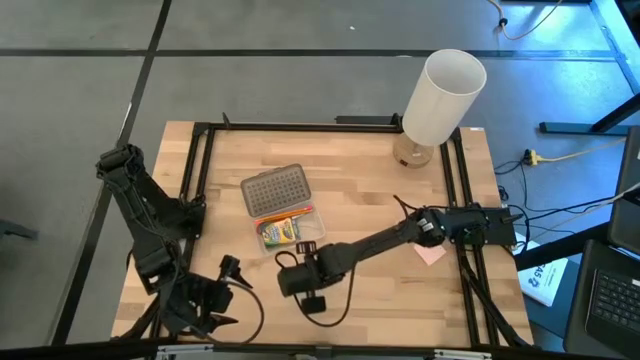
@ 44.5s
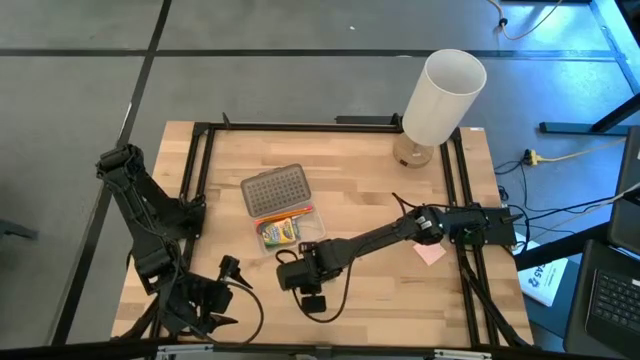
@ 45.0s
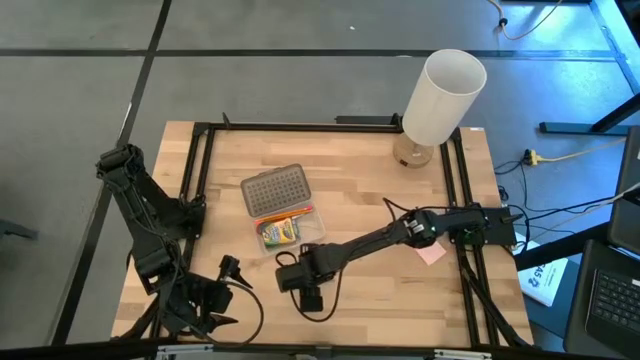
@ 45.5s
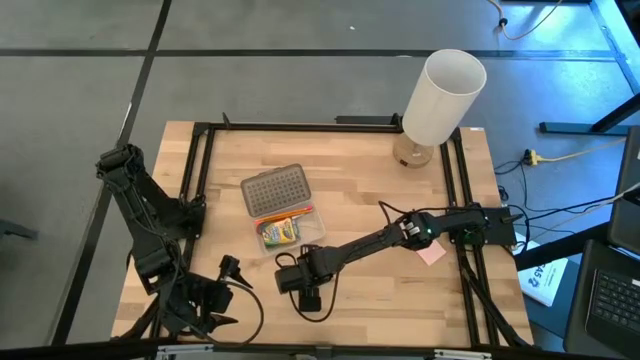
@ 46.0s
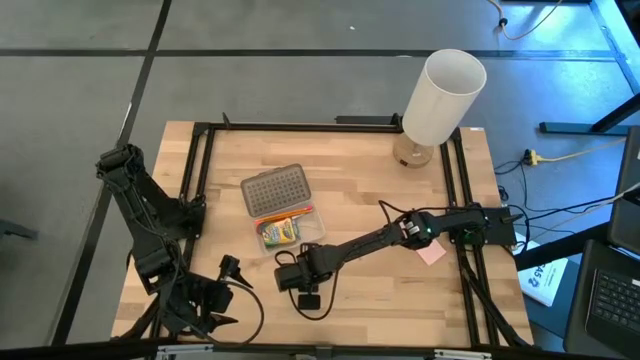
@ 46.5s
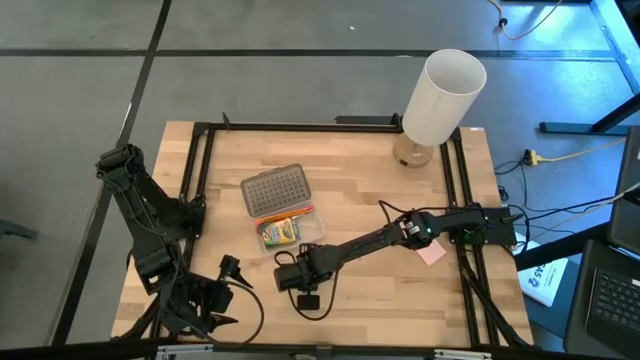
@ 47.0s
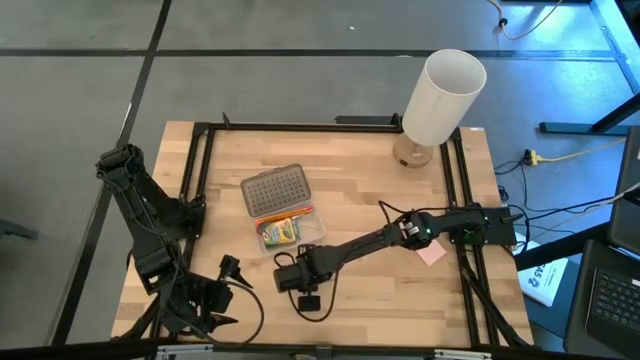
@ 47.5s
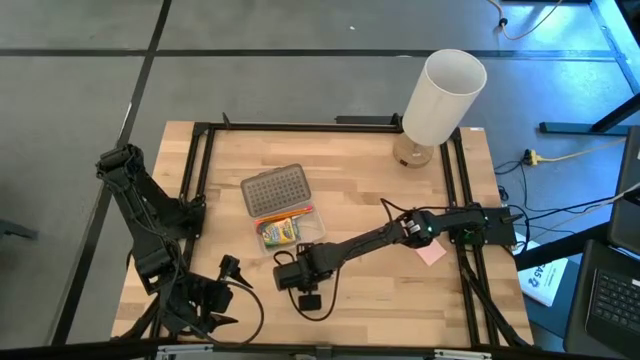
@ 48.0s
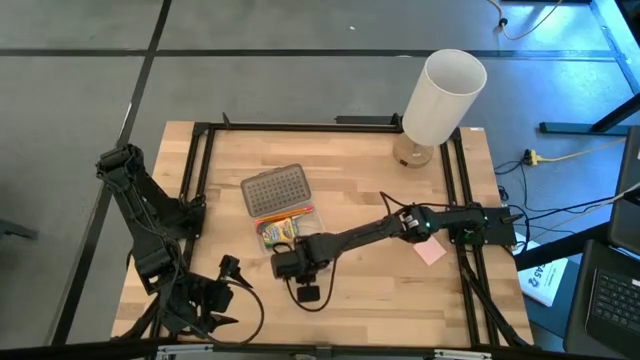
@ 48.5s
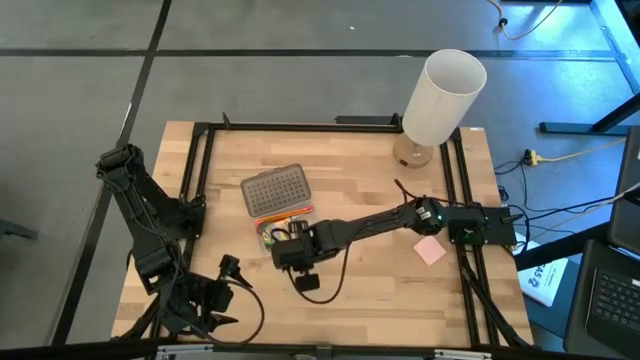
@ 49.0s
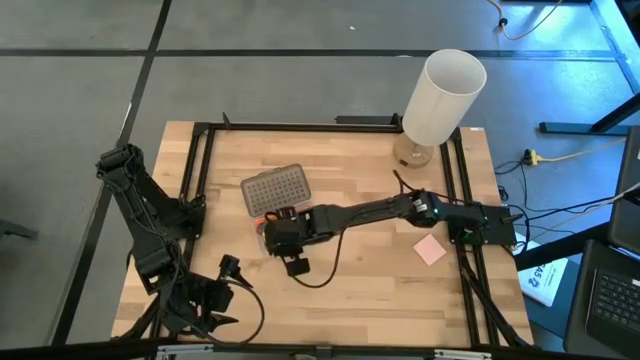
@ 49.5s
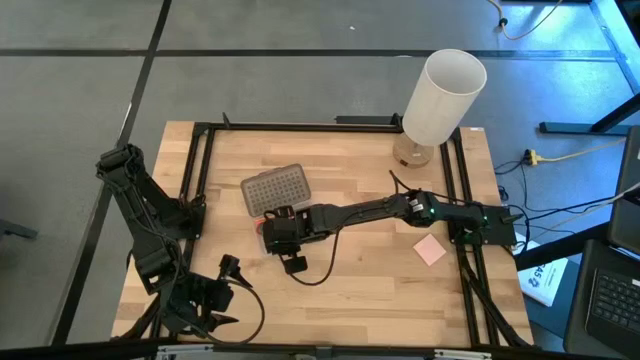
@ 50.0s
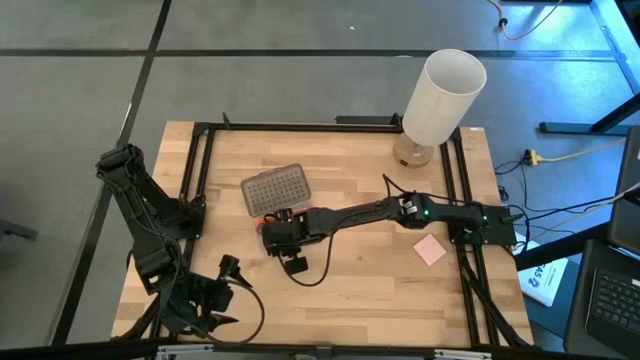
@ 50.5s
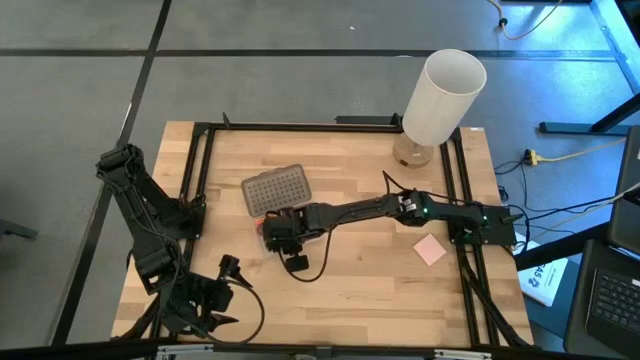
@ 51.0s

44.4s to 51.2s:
Task: Pack school essentials
Put the purple pen into the transparent supply box

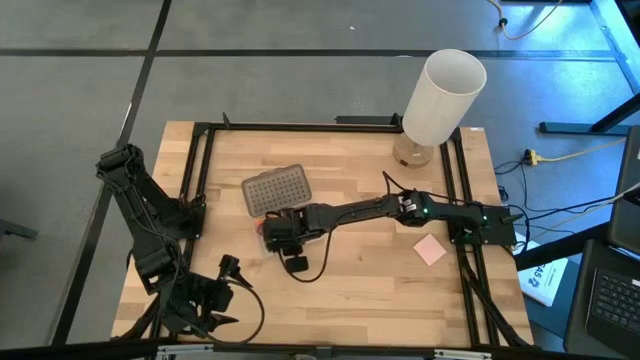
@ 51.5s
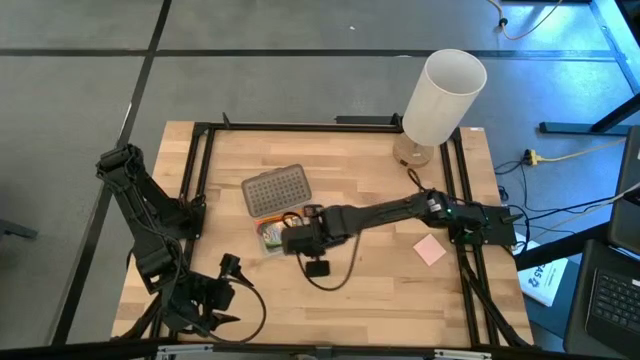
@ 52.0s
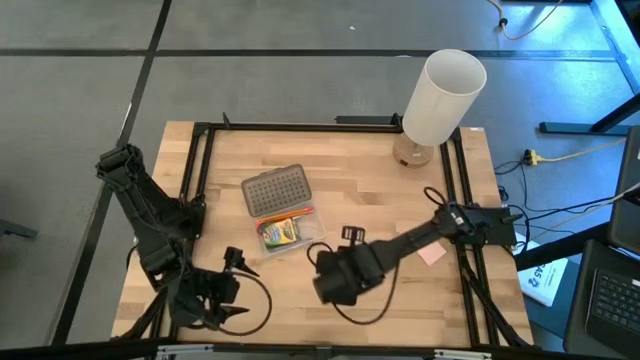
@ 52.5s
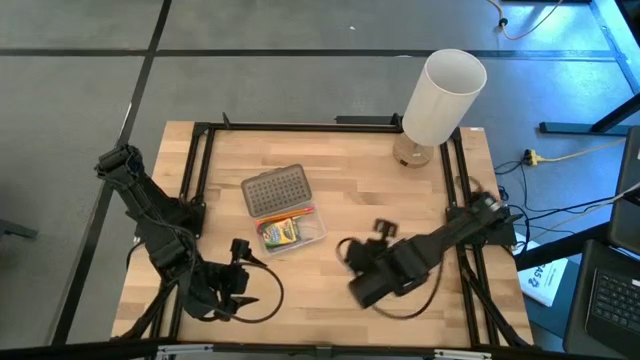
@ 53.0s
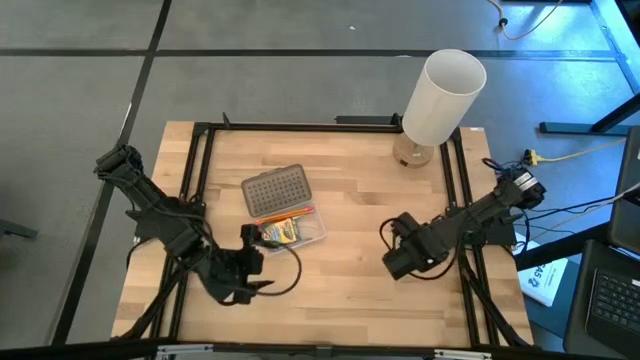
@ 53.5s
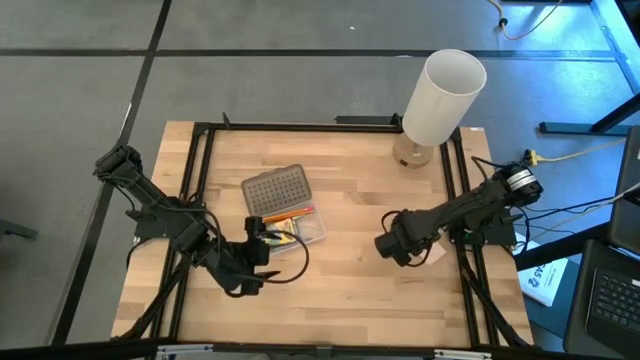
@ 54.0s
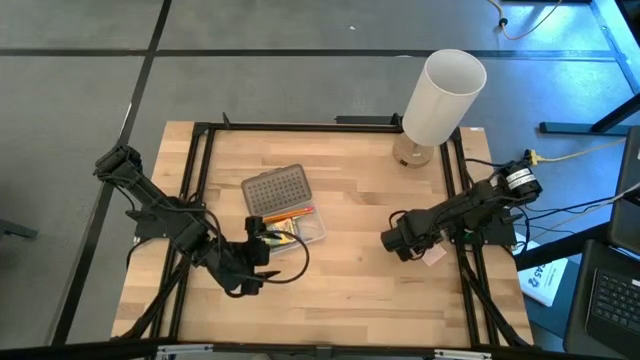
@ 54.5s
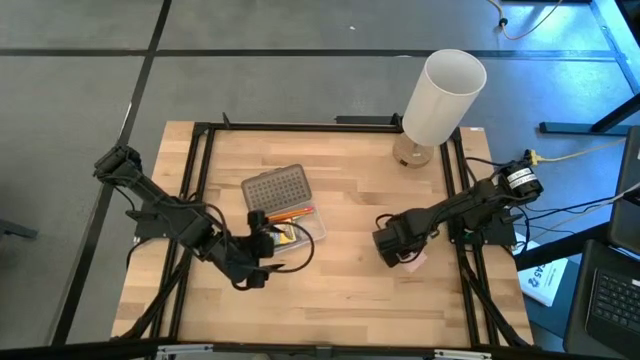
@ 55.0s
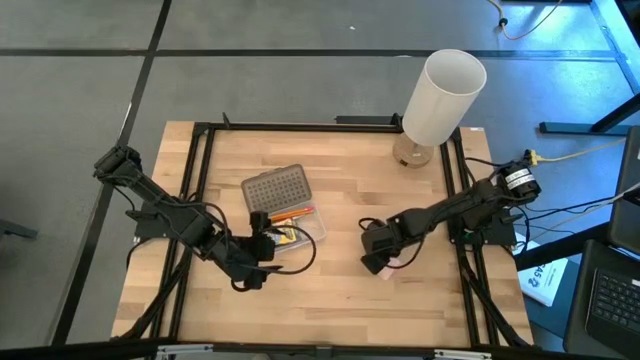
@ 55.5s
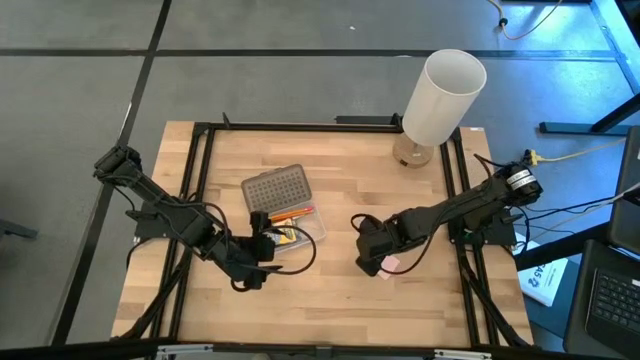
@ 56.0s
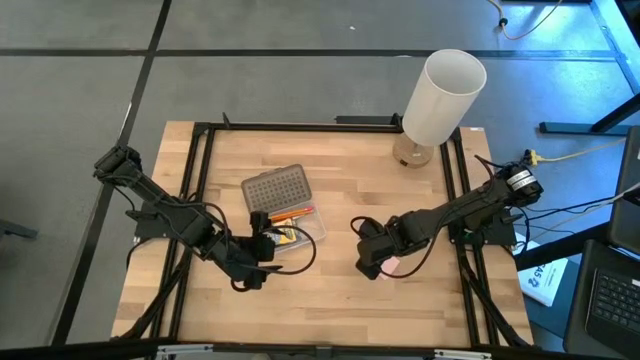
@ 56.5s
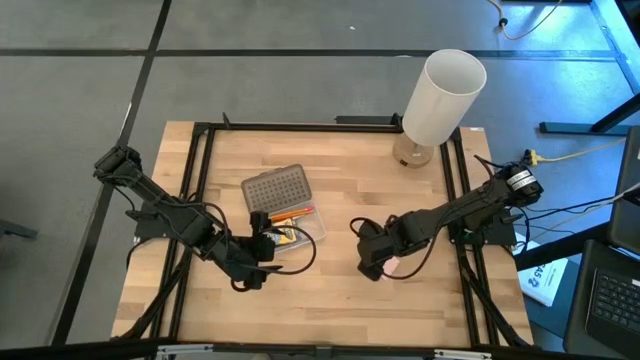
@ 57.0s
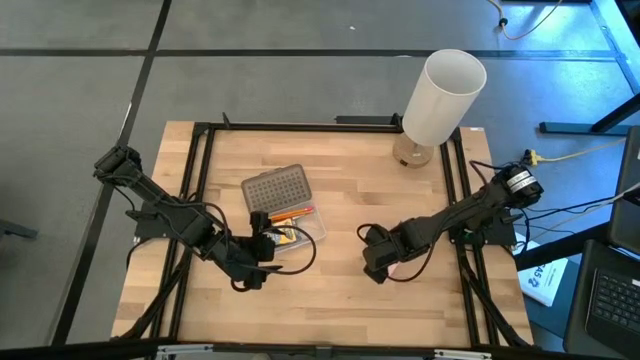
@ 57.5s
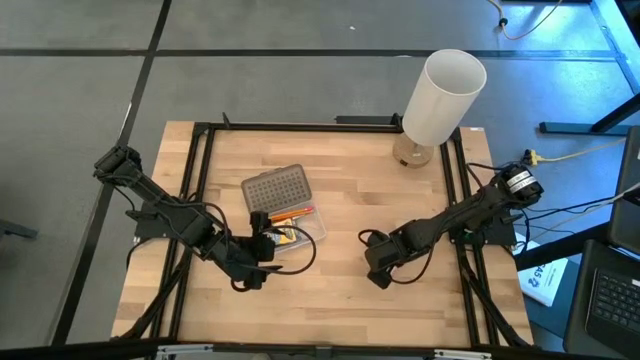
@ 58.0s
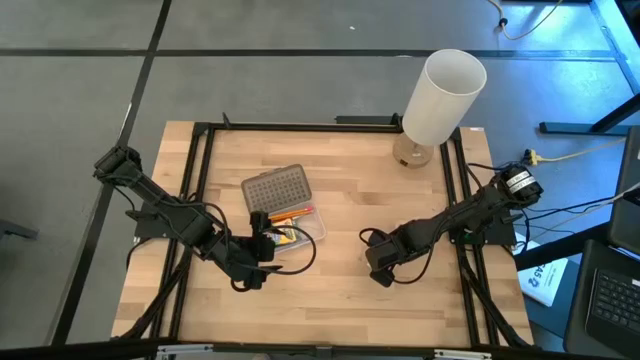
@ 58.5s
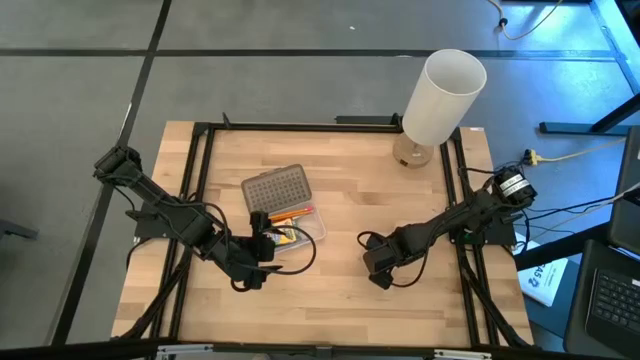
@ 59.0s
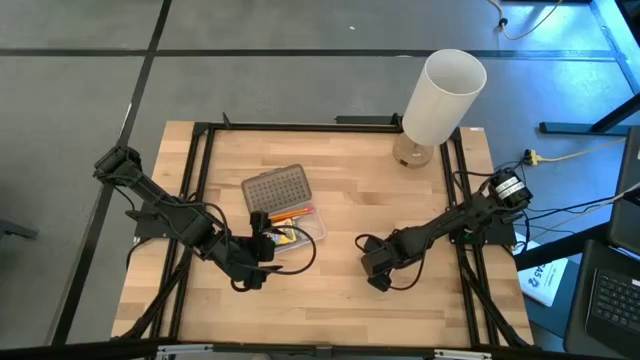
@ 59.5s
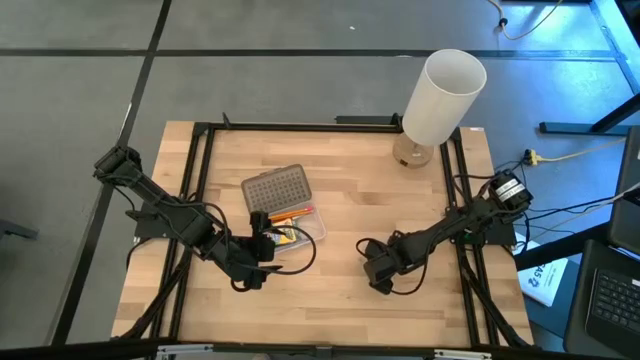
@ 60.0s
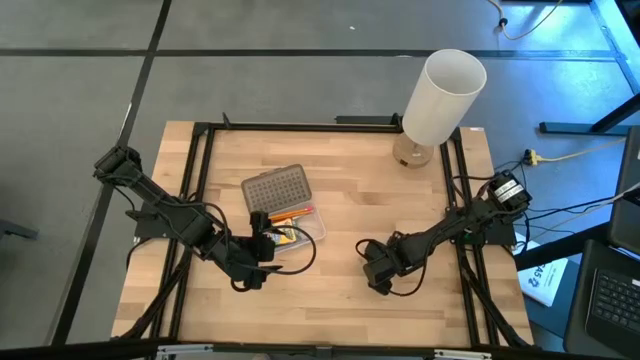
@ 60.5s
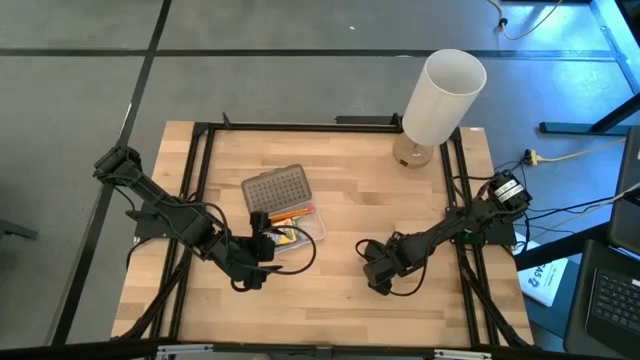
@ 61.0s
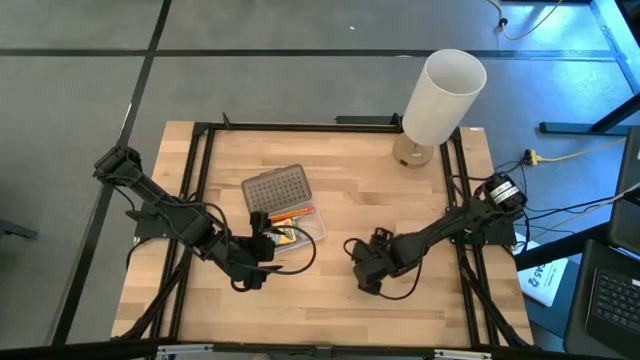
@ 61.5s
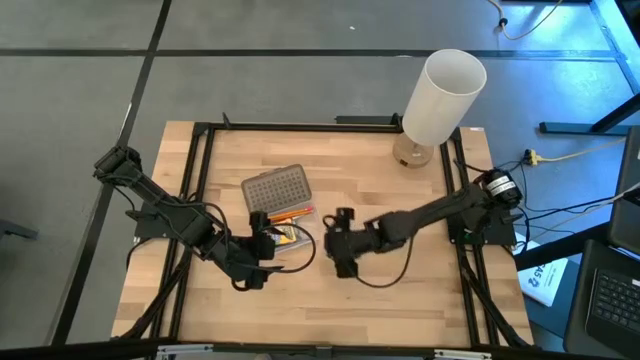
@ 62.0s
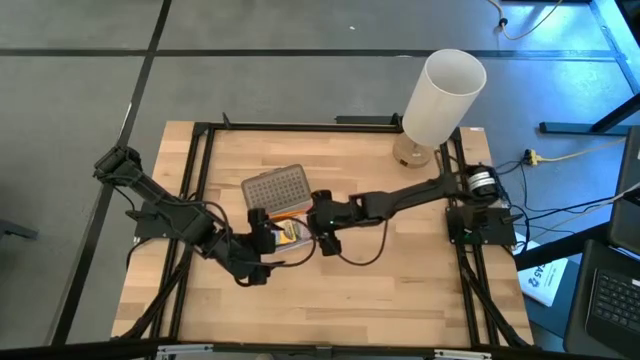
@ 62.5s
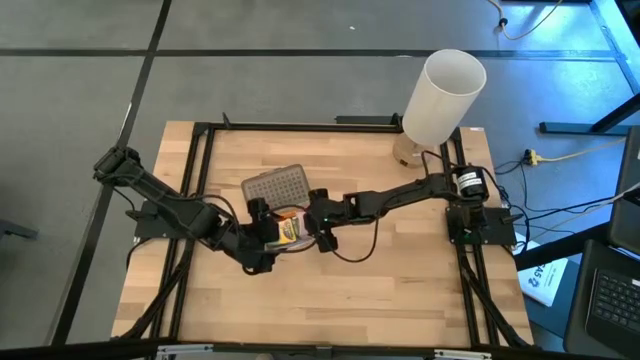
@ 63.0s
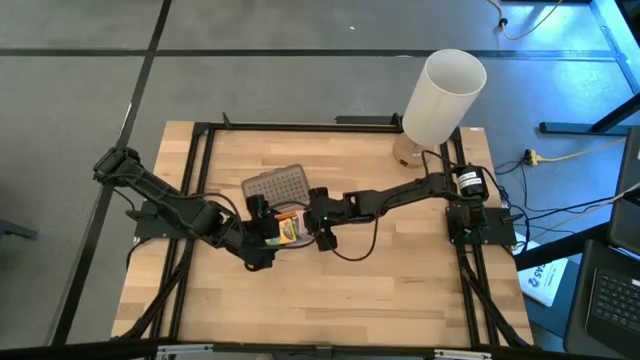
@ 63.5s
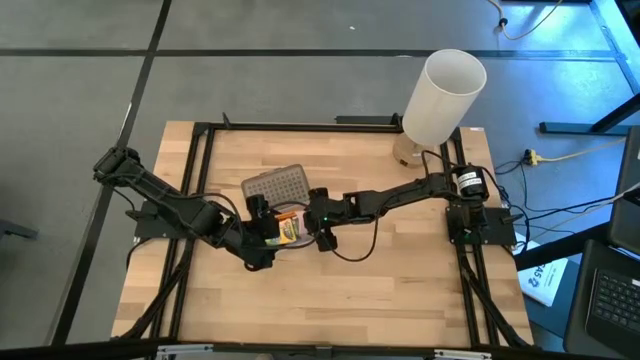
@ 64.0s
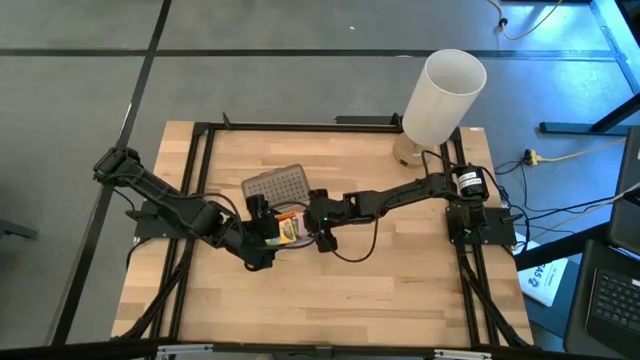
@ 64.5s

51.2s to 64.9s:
Put the pink sticky notes into the transparent supply box

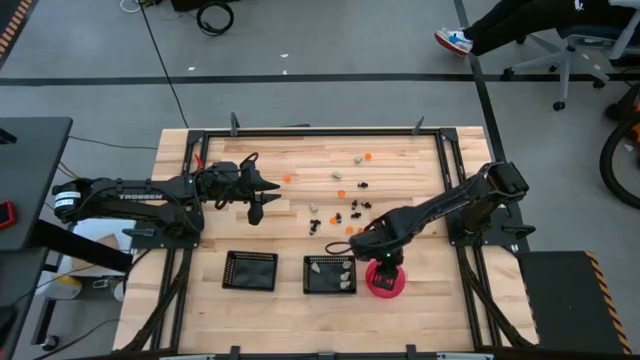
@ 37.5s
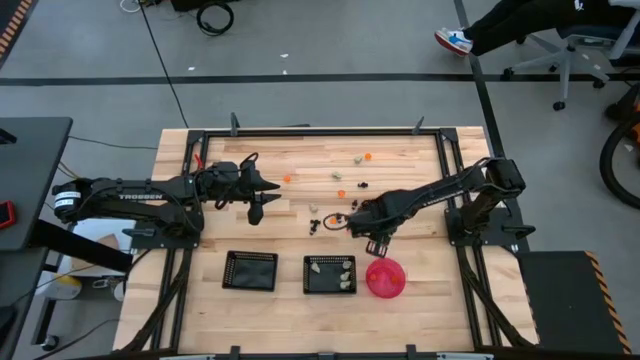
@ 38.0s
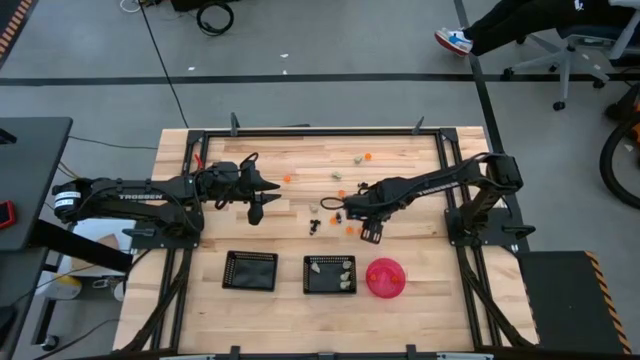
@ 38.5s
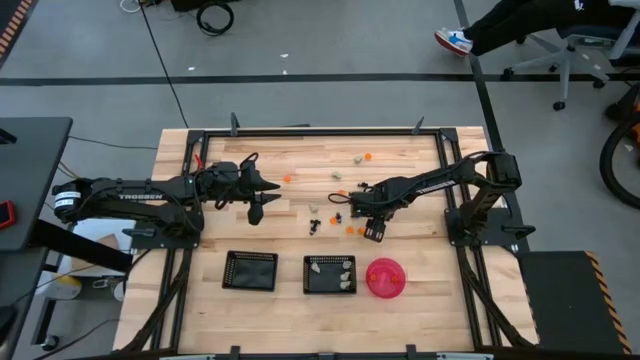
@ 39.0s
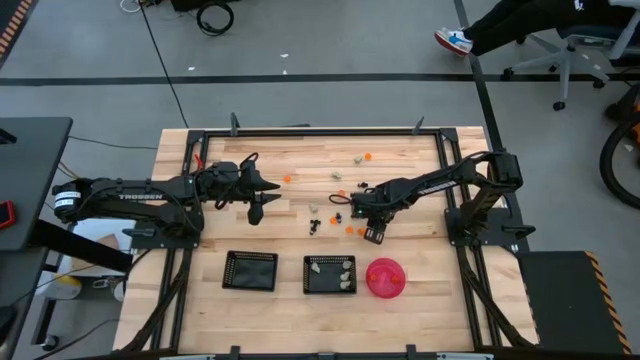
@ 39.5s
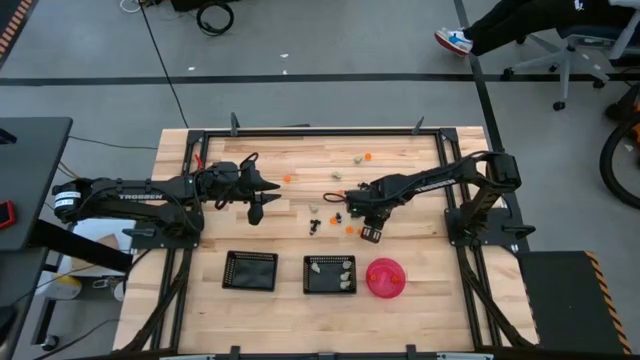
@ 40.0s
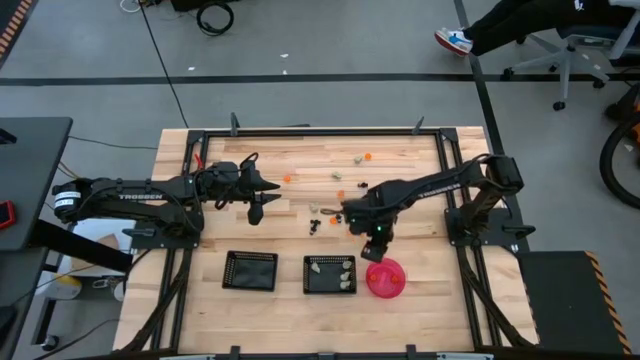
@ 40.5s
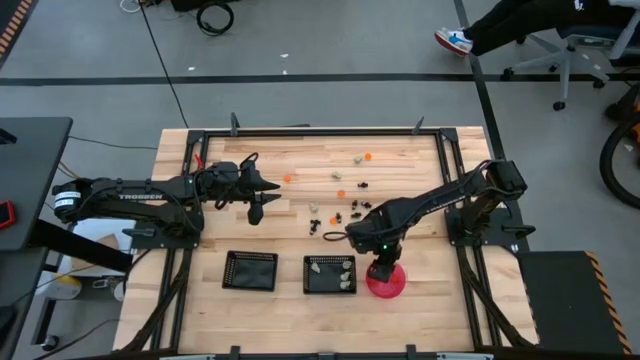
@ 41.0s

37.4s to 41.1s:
Task: Sort Halloween decoration
Put the orange pumpkin toy into the pink bowl
